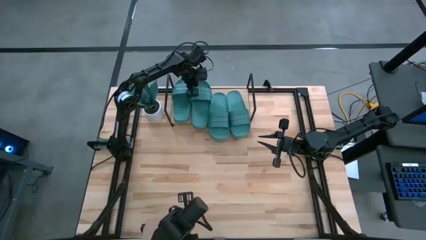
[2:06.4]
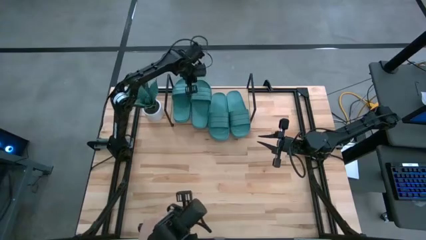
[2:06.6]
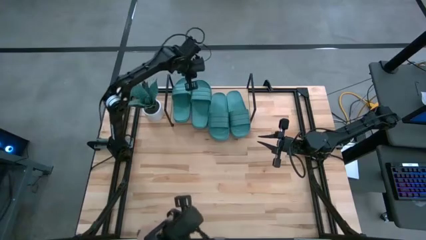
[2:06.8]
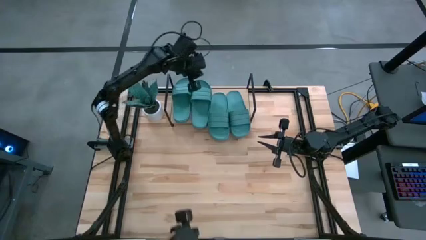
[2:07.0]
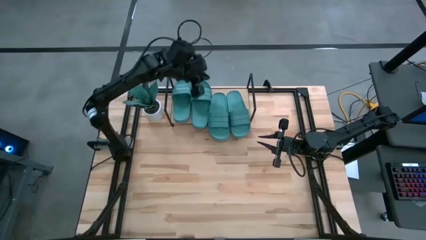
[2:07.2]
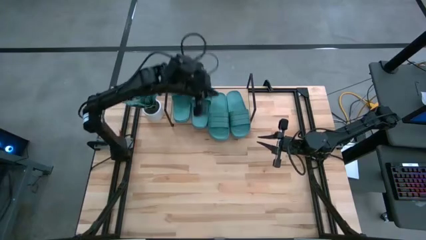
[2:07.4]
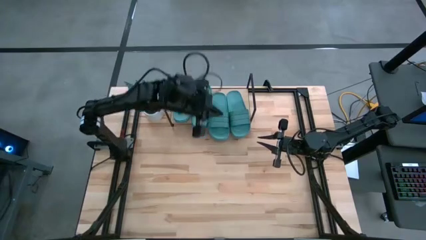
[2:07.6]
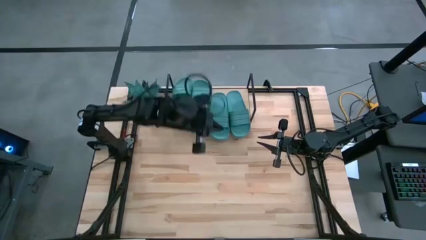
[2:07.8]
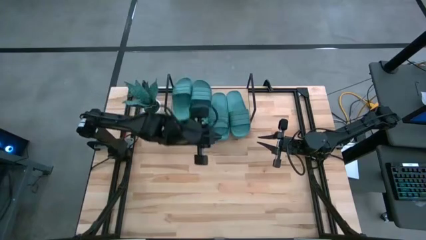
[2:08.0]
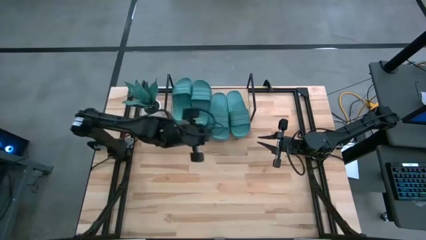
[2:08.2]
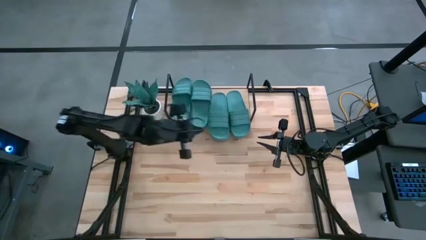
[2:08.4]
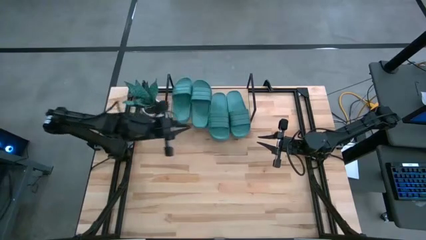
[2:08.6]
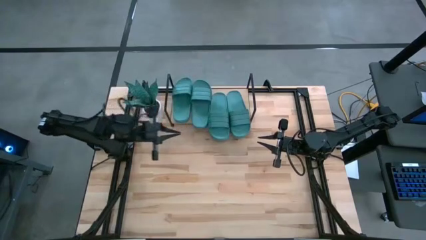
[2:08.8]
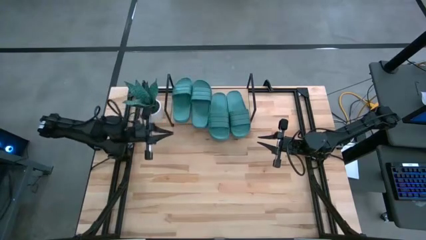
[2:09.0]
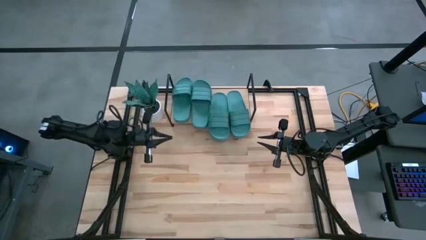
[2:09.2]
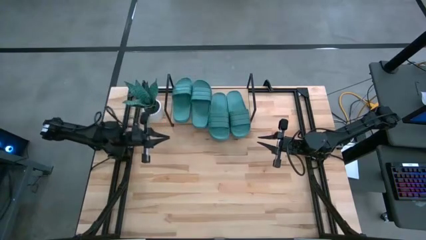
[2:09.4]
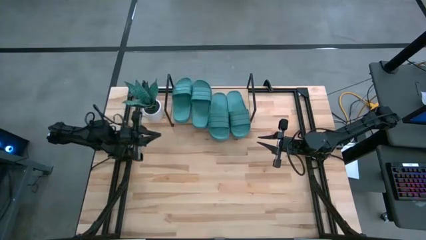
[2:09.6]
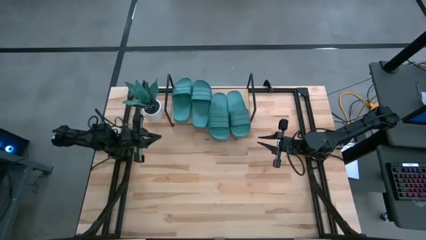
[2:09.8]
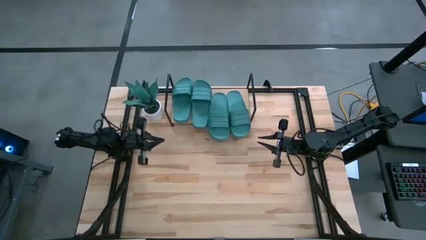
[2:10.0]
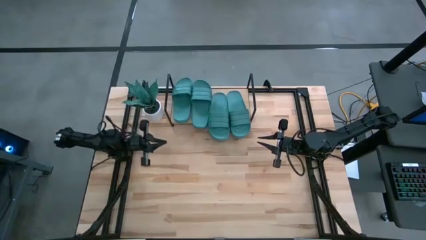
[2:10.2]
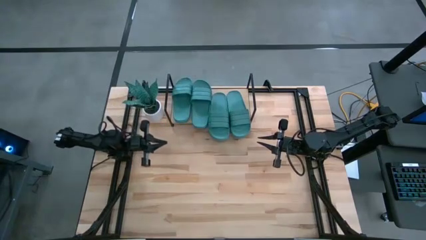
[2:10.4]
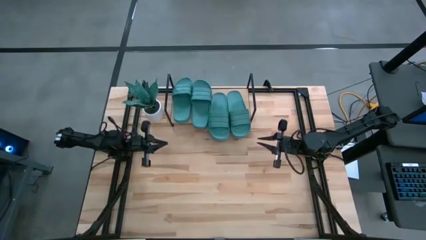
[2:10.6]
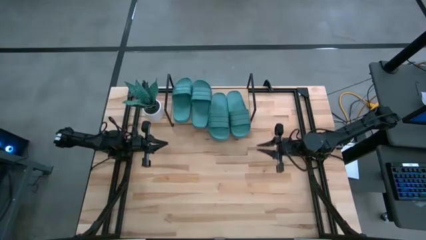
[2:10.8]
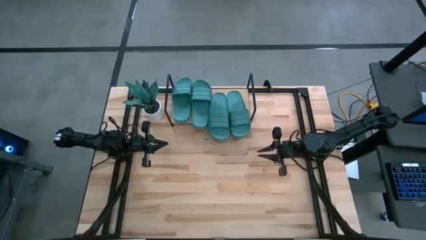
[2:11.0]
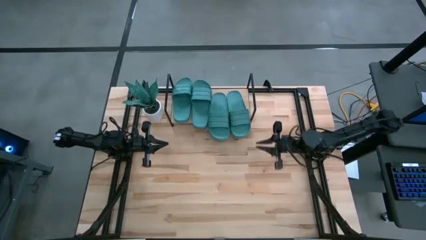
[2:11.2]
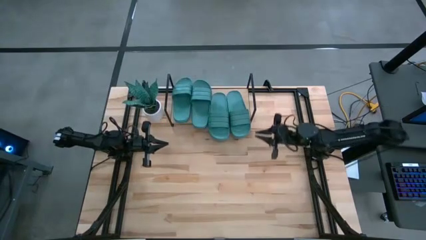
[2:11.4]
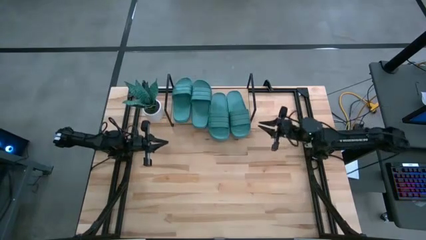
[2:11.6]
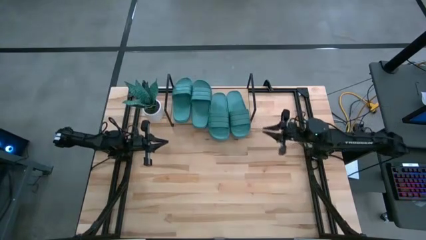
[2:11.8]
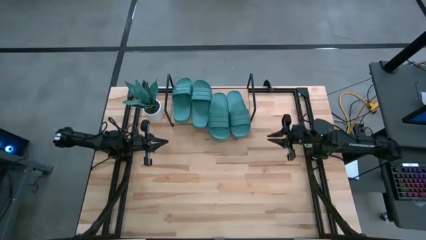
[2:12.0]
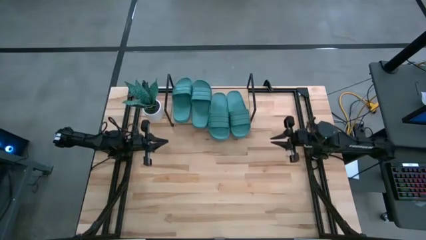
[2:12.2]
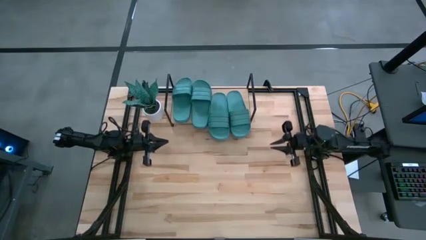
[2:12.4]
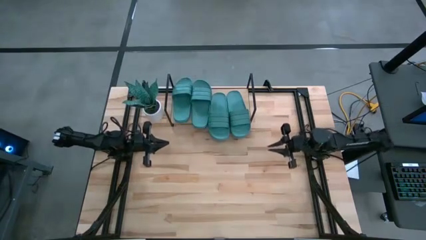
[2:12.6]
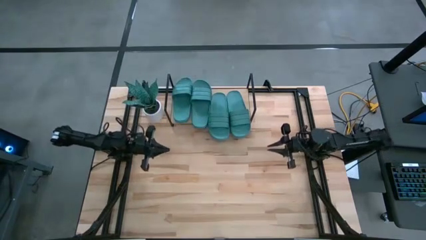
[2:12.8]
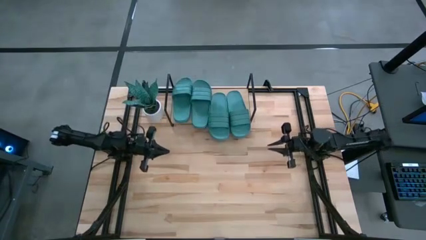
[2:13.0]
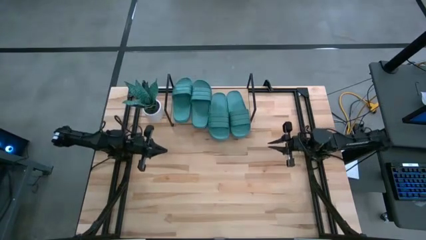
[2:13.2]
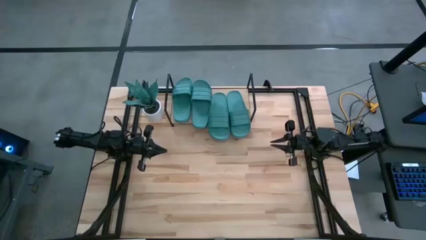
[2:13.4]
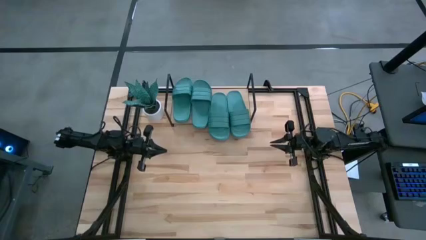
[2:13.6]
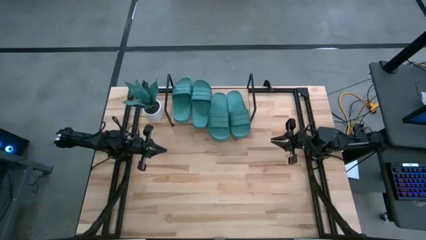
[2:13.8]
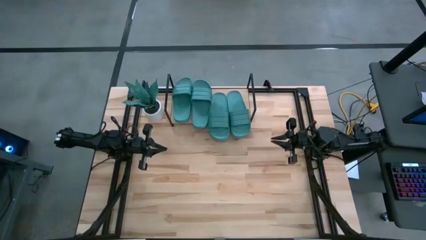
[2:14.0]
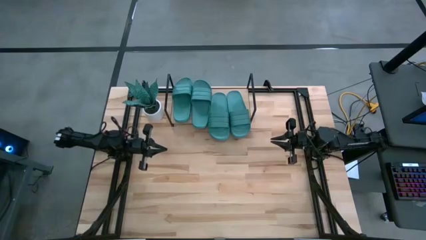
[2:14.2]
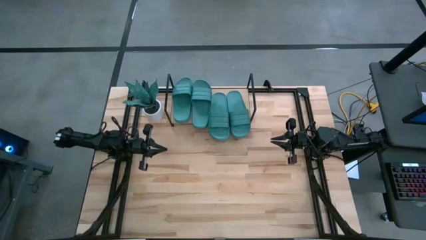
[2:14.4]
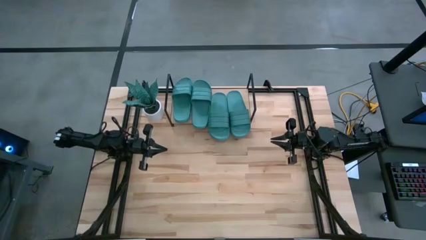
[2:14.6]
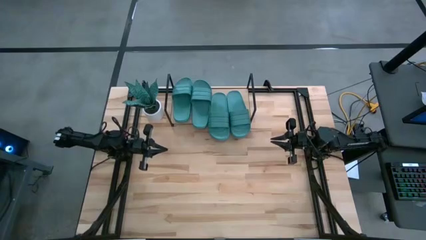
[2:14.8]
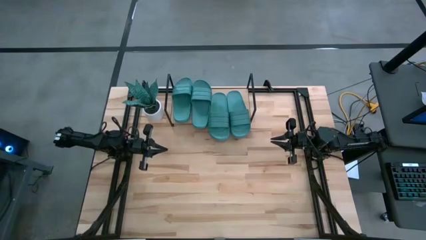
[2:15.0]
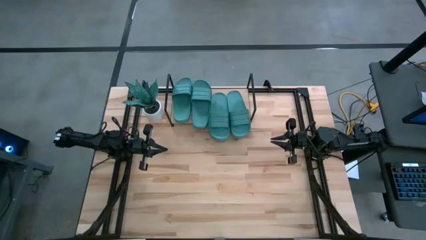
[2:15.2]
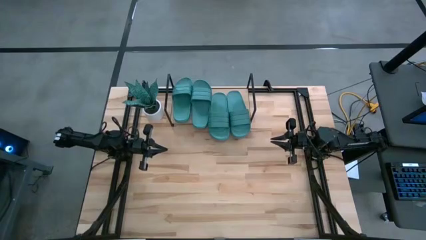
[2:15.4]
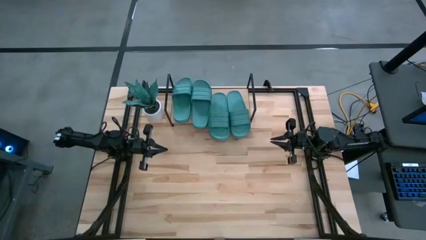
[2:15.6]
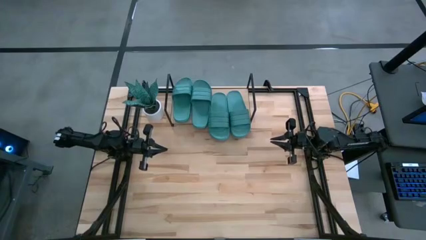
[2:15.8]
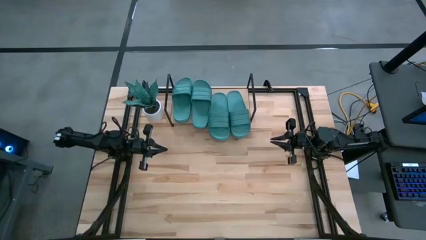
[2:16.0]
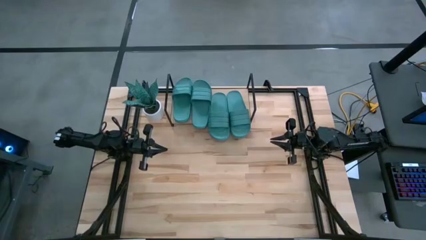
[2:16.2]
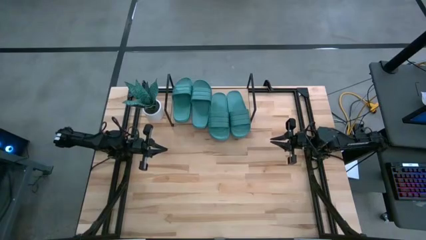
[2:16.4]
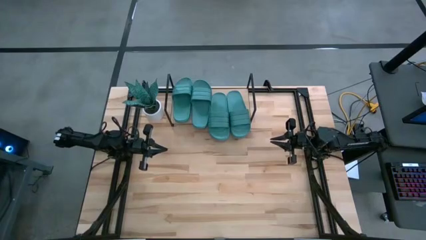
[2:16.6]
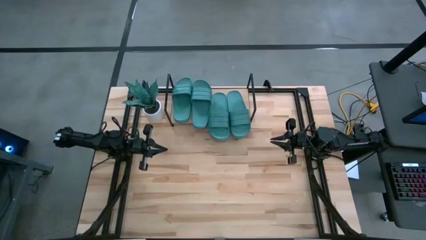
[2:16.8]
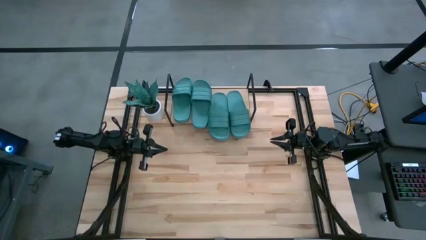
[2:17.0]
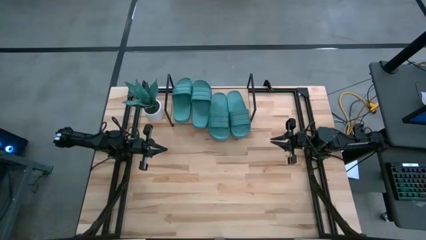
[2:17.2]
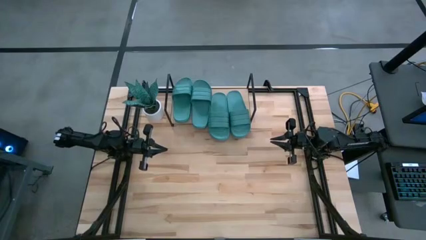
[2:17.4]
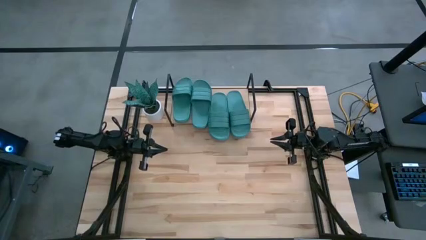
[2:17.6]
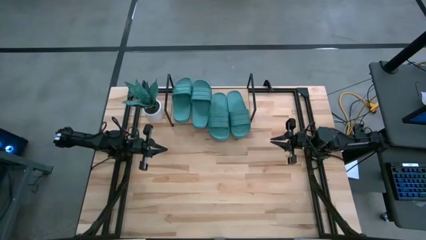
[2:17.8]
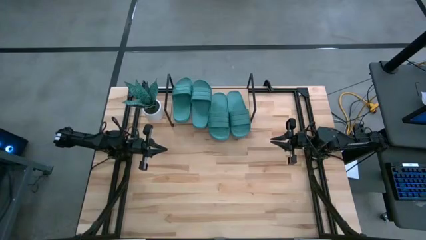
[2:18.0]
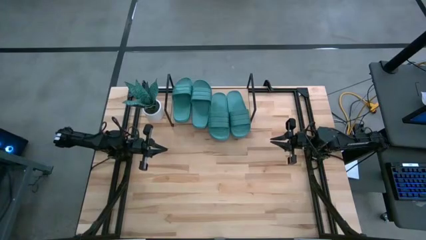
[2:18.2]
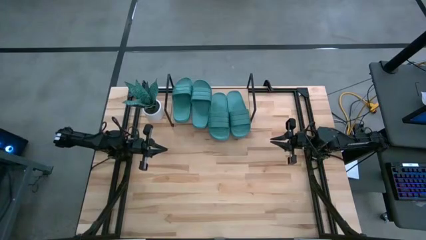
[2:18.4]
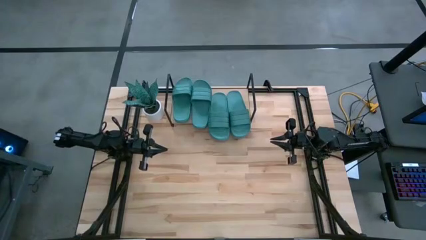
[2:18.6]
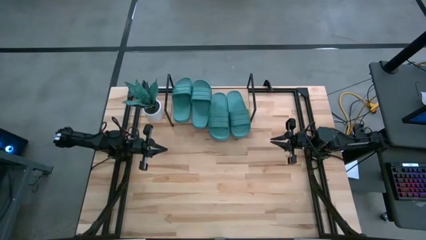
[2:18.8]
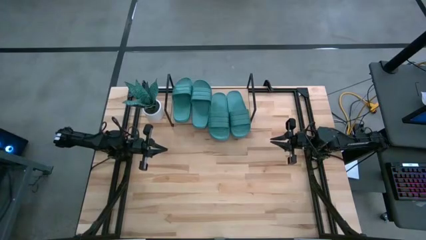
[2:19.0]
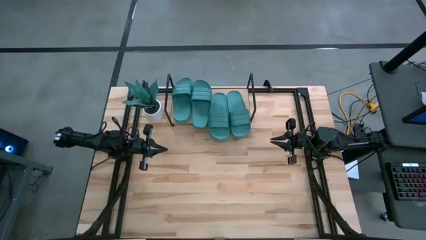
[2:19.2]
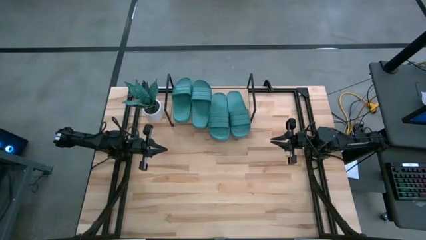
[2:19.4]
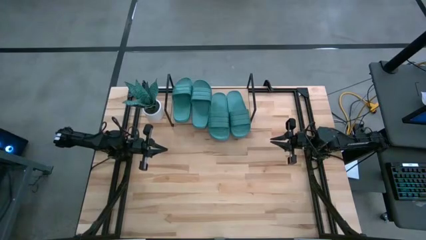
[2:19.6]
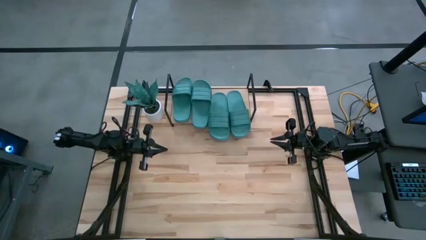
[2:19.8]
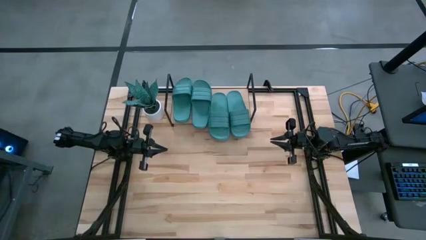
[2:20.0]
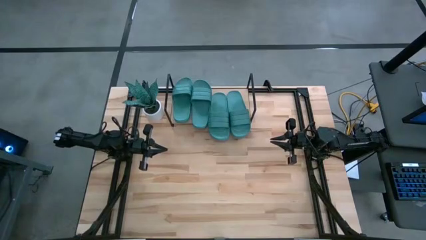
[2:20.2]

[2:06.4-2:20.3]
Task: Pick and place slides into the shelf
Return to Home Position
